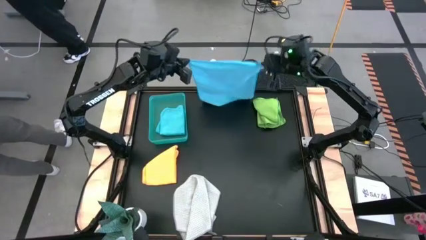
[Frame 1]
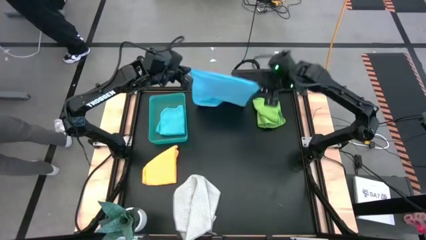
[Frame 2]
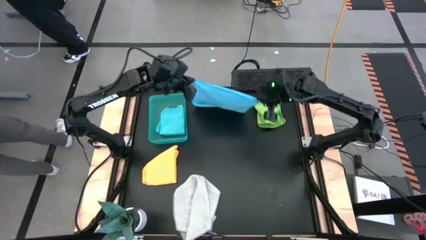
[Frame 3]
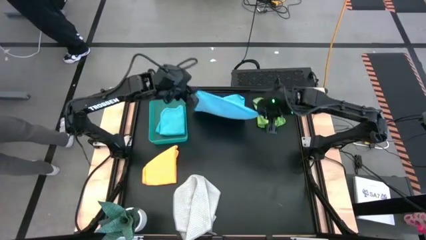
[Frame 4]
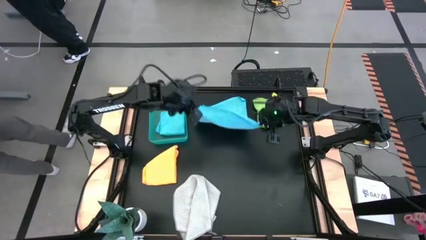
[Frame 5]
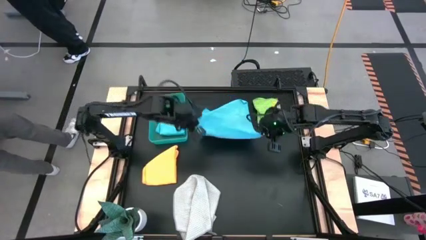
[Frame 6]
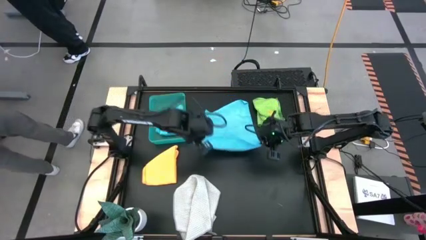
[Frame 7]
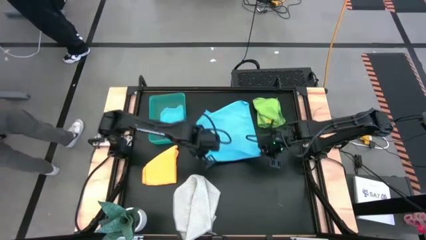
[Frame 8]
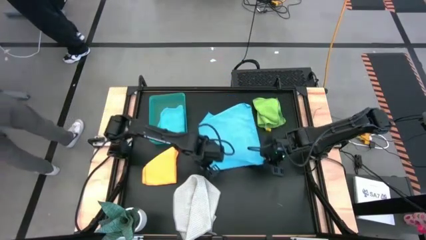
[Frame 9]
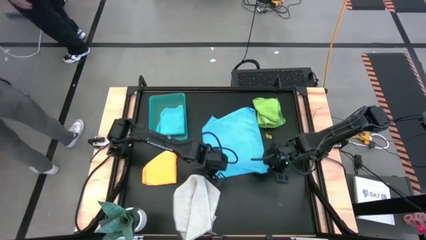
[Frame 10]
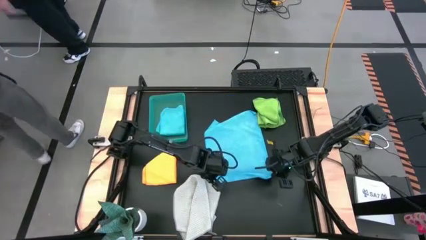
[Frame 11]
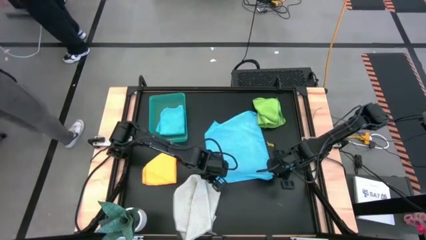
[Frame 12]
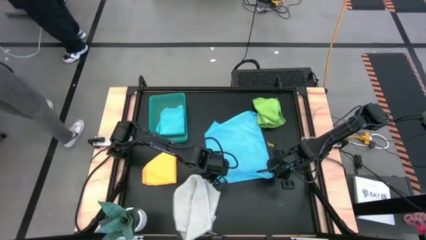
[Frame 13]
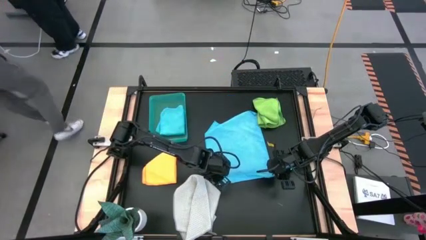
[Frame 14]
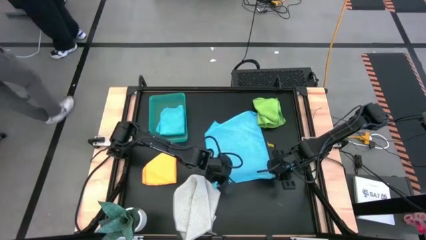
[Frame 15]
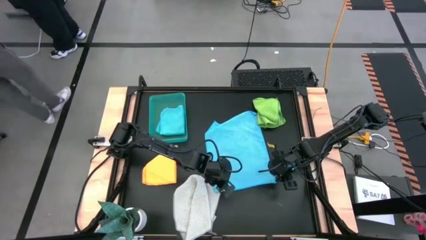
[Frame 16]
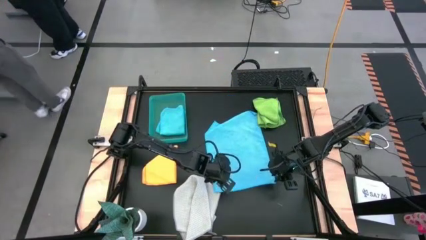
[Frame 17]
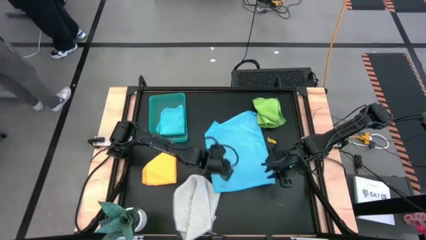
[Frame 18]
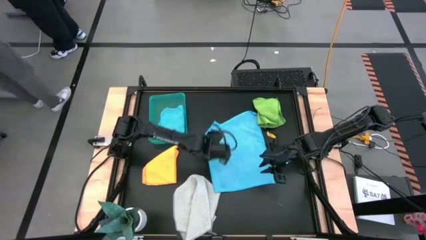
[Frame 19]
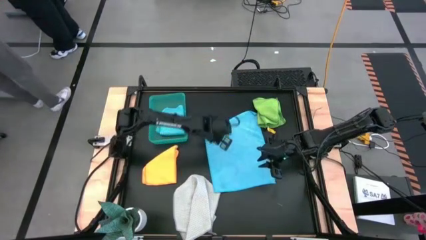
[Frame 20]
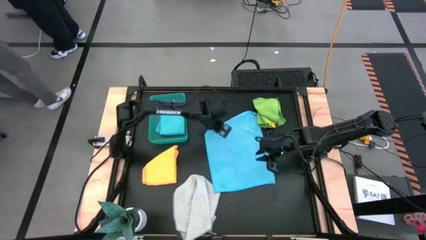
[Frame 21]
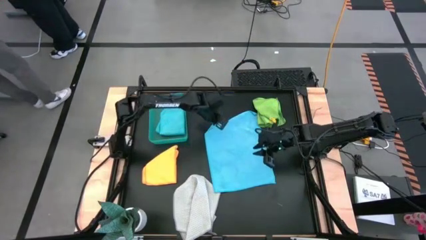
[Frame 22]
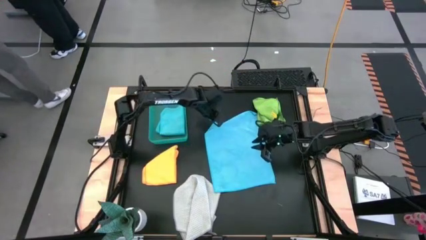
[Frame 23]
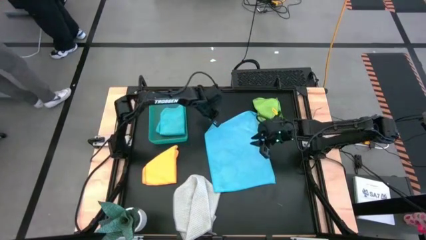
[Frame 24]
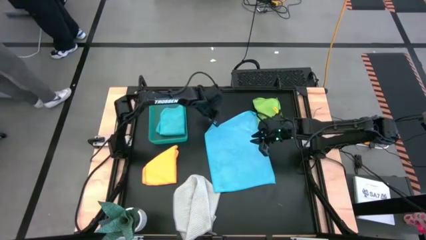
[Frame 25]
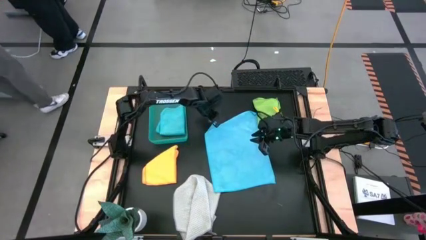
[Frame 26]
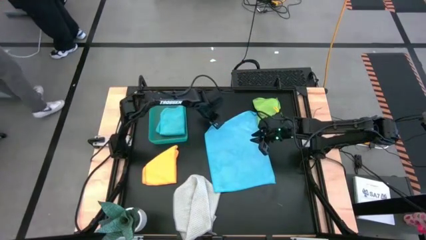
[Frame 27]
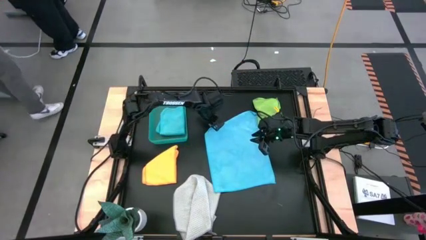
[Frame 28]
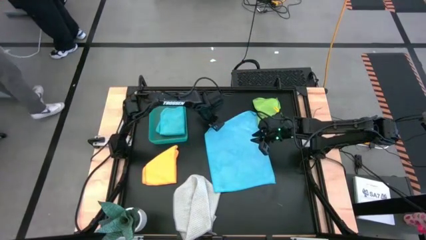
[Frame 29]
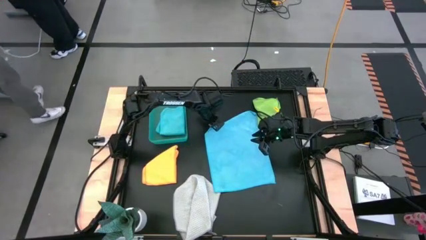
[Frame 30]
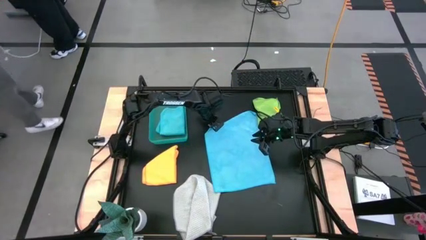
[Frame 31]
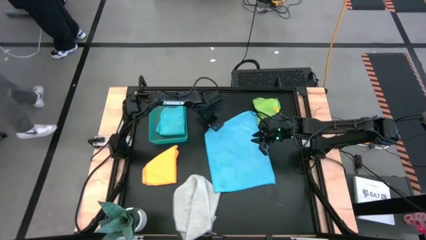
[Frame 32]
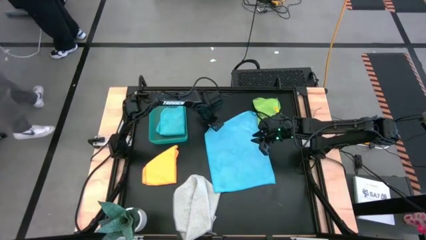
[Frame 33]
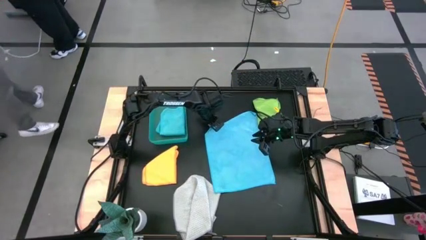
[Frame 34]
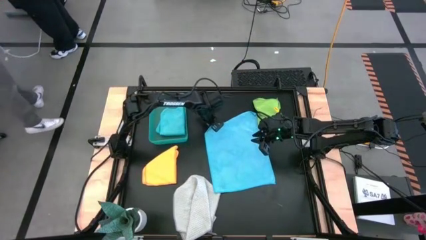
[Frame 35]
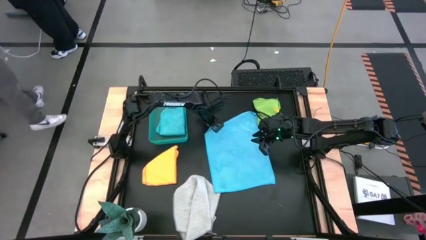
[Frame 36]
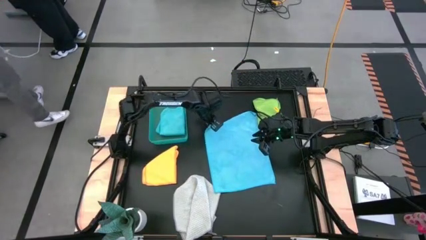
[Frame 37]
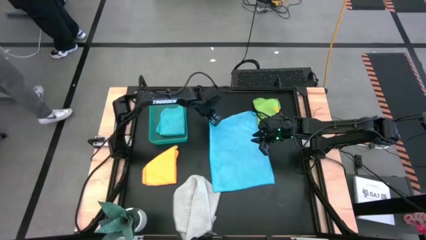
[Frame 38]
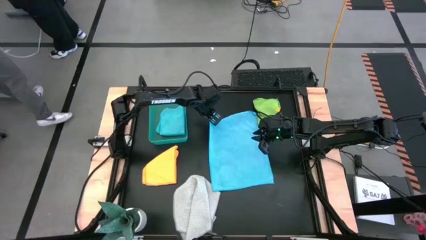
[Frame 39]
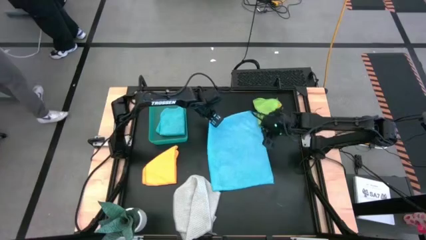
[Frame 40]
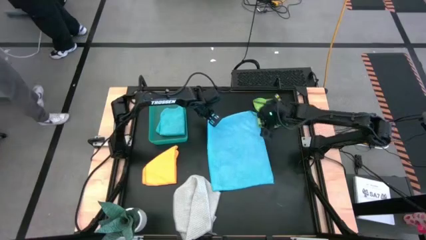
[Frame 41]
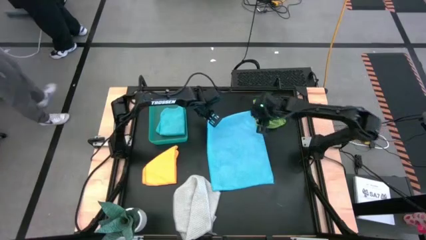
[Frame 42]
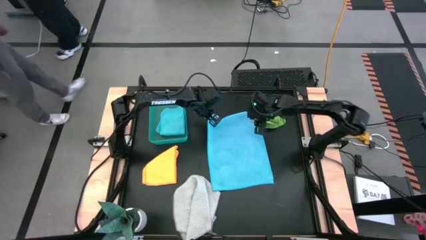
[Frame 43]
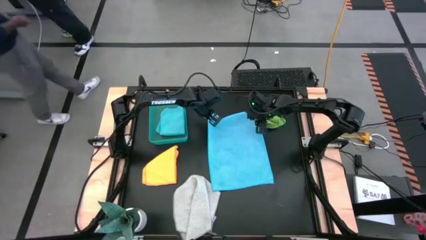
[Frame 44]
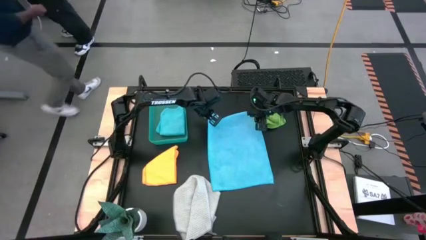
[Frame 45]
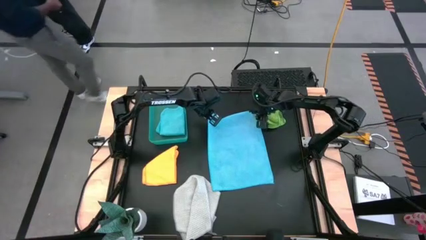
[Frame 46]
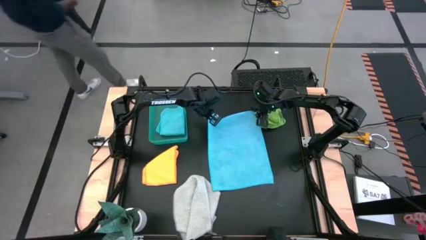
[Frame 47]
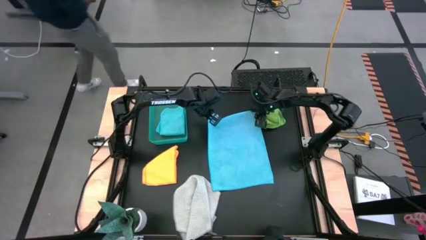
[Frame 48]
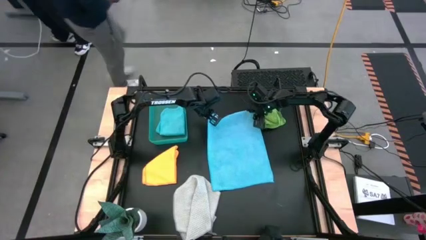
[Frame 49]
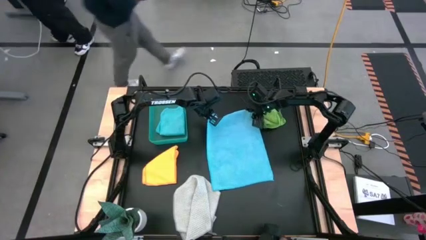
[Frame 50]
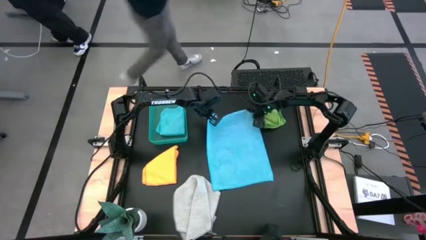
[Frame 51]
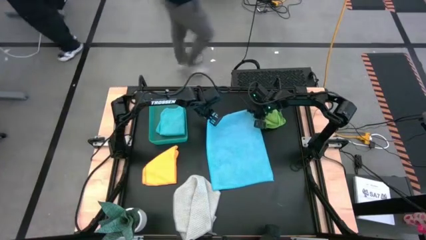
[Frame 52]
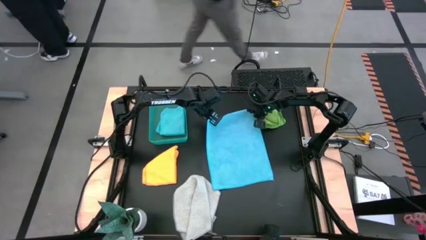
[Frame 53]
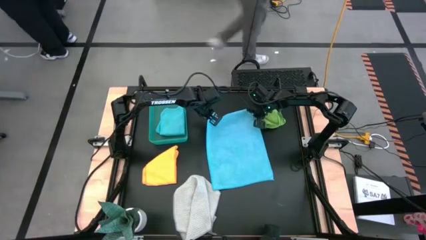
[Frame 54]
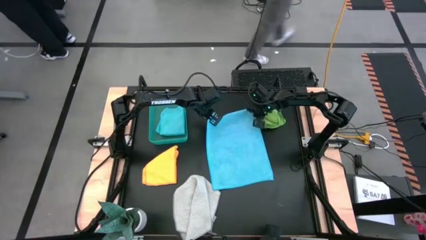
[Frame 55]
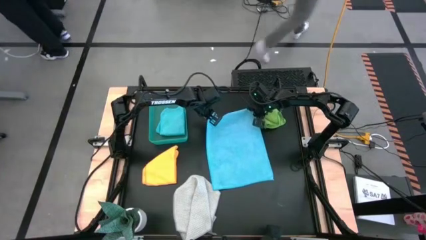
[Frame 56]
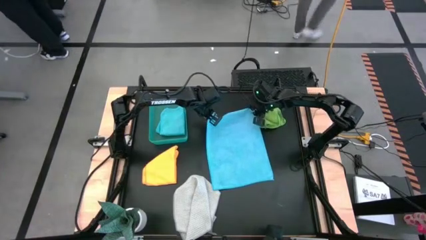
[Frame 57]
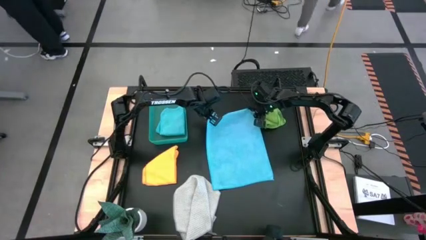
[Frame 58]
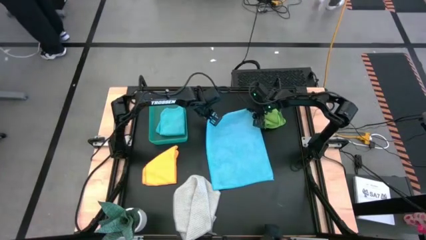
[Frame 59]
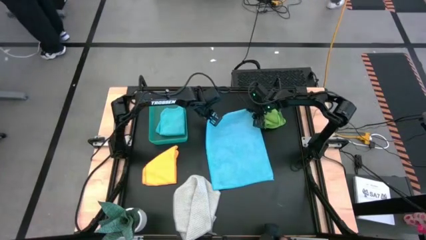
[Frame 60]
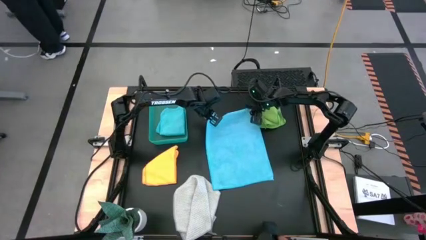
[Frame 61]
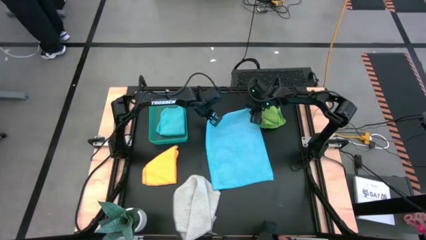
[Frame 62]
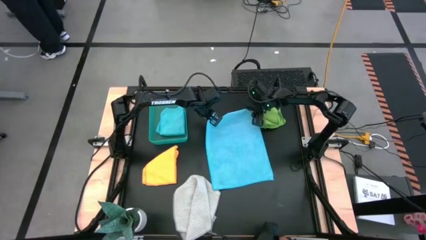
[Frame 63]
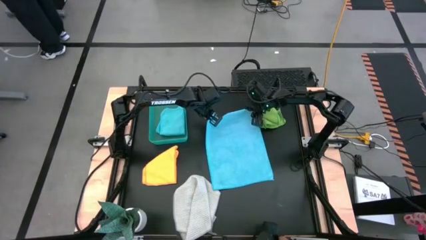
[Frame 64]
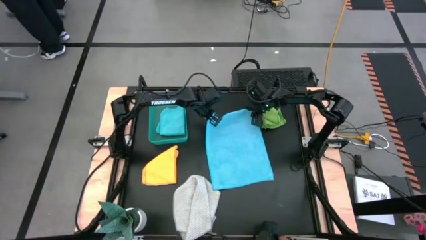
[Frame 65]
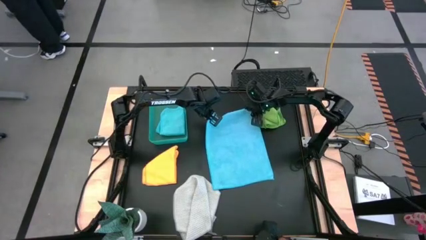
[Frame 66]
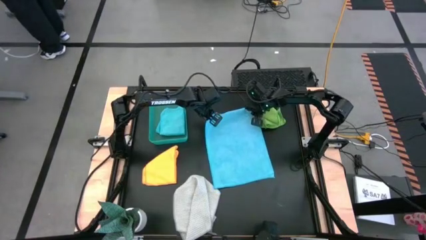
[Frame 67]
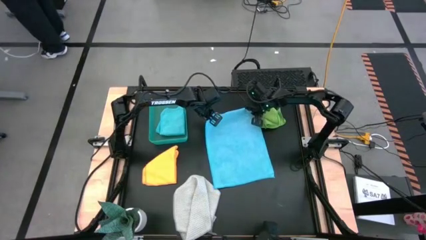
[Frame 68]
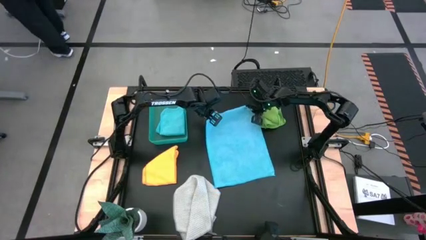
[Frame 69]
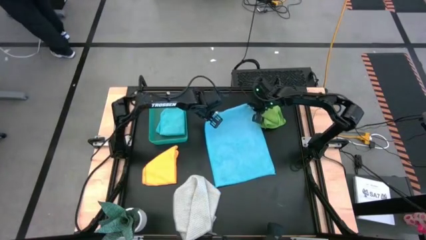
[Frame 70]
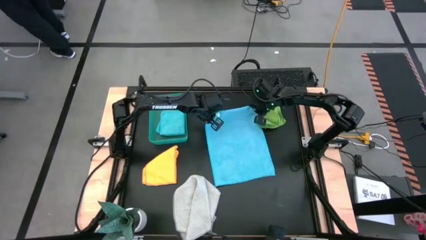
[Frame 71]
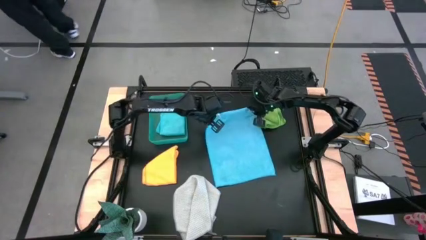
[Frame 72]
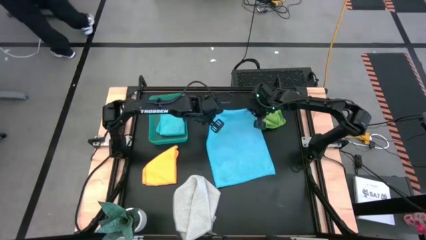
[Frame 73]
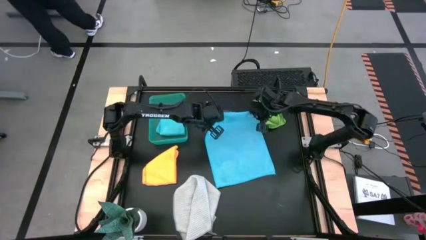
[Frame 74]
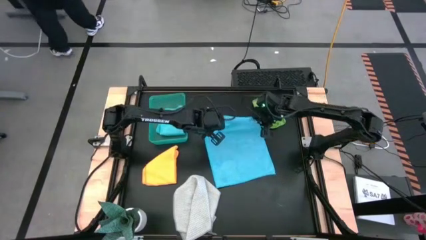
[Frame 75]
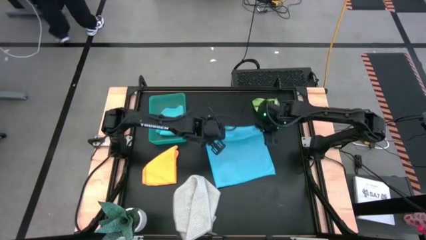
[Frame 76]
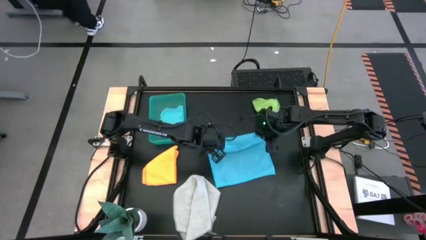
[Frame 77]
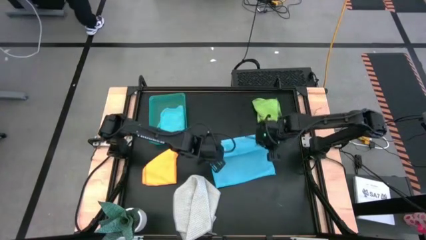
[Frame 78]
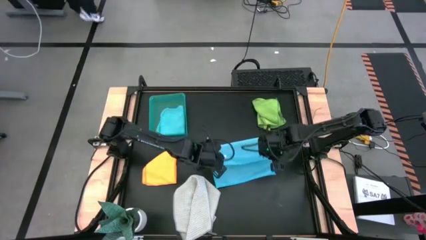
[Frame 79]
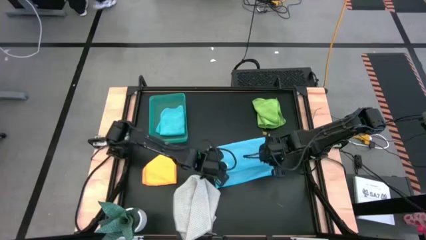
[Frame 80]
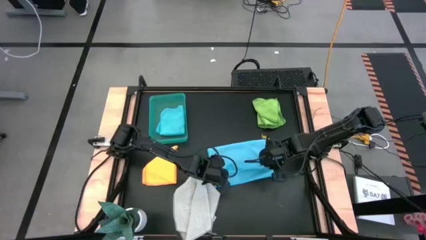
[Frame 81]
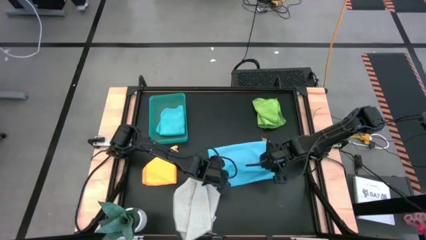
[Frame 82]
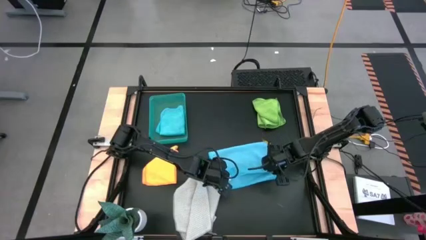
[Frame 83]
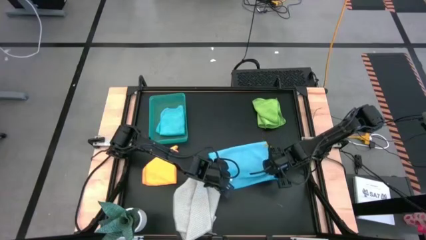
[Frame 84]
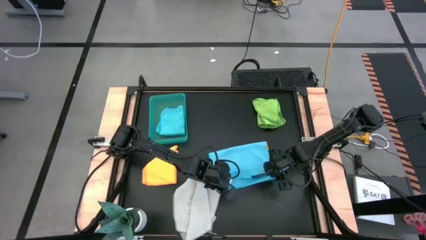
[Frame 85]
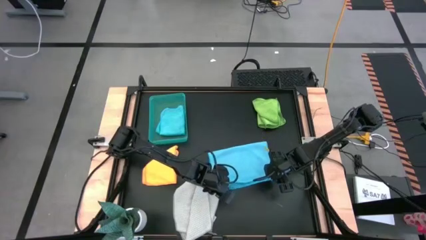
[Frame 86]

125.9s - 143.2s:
Task: Fold microfiber towels
Fold the blue microfiber towel
